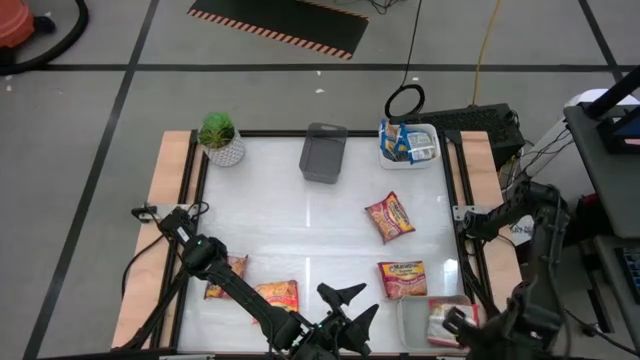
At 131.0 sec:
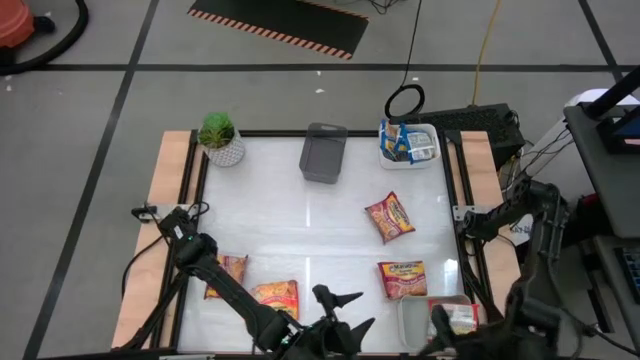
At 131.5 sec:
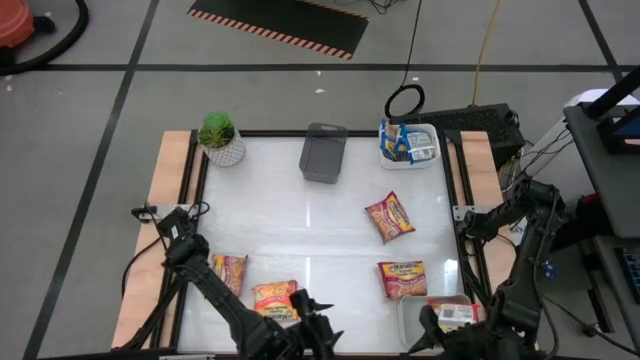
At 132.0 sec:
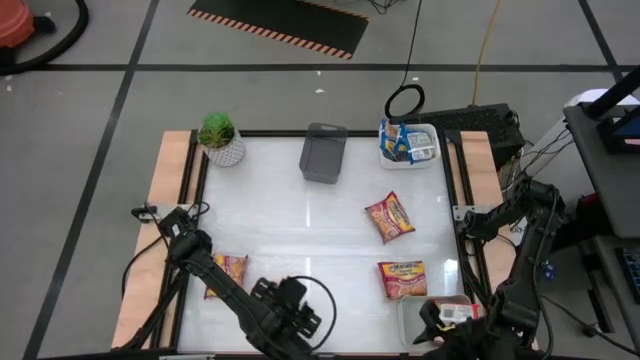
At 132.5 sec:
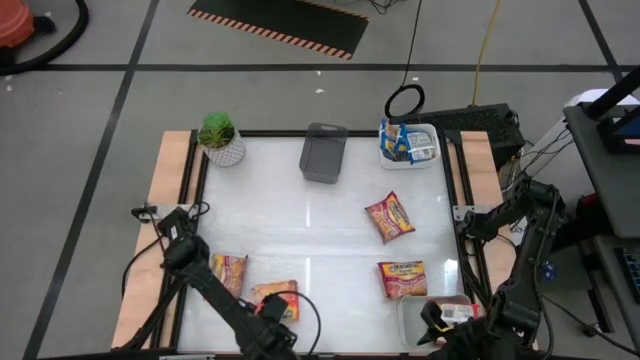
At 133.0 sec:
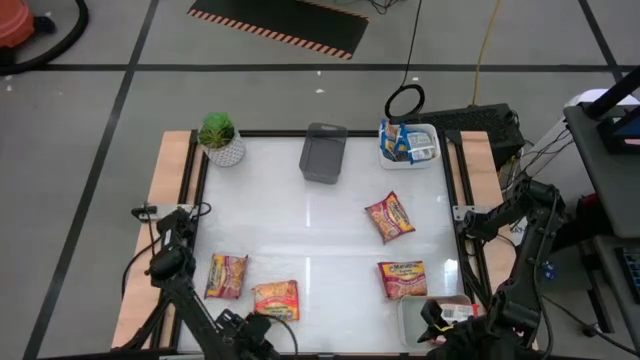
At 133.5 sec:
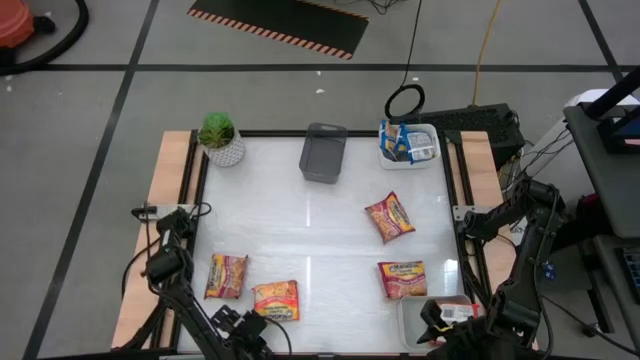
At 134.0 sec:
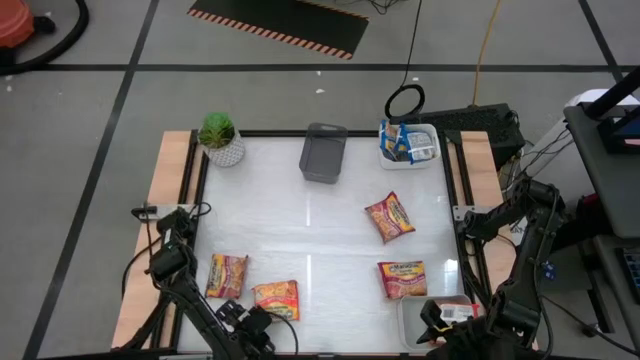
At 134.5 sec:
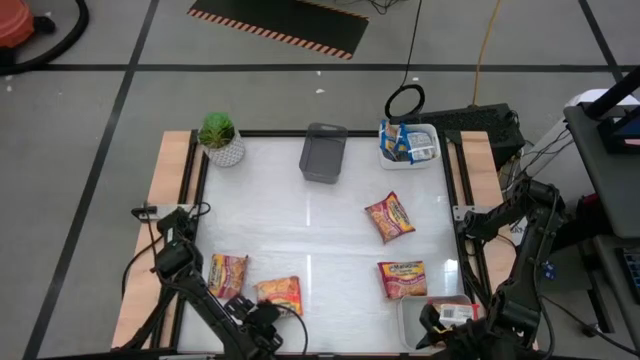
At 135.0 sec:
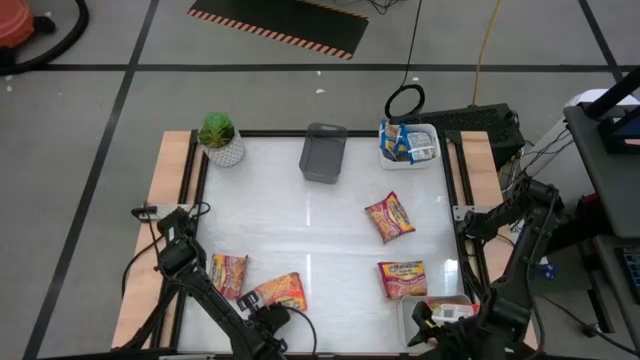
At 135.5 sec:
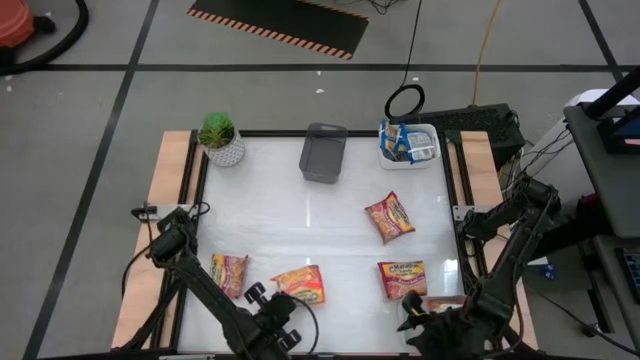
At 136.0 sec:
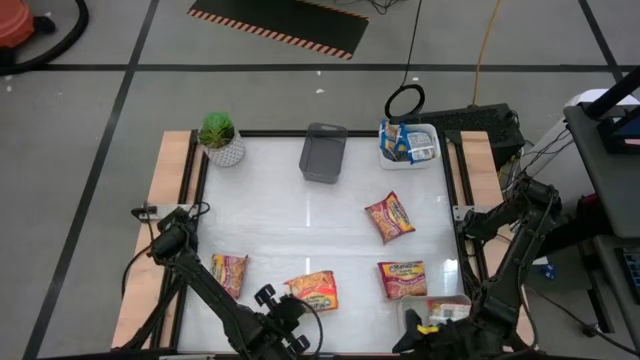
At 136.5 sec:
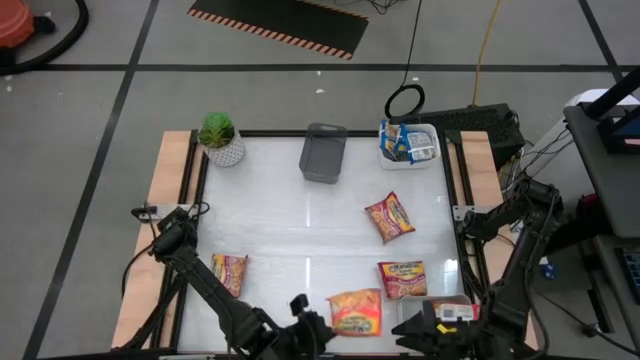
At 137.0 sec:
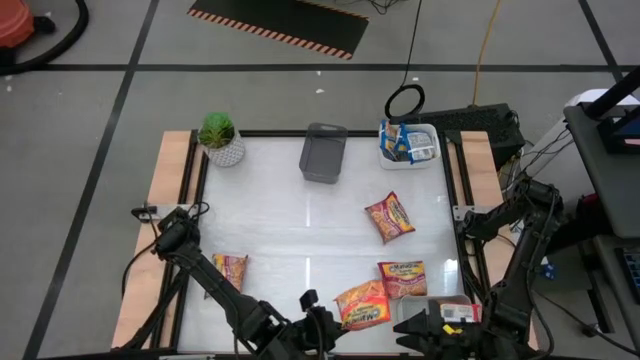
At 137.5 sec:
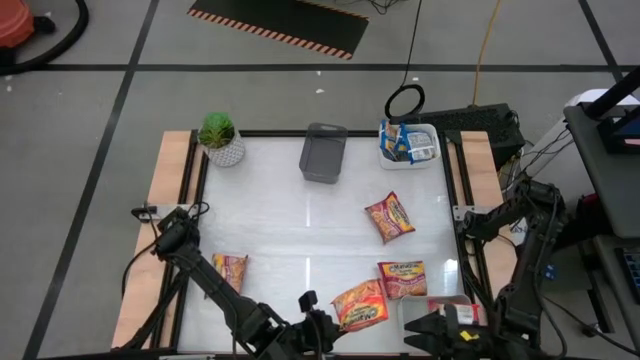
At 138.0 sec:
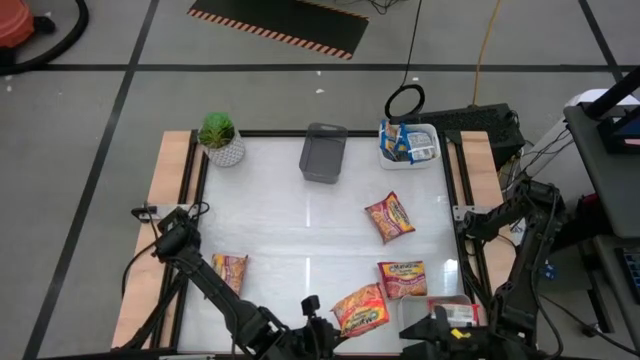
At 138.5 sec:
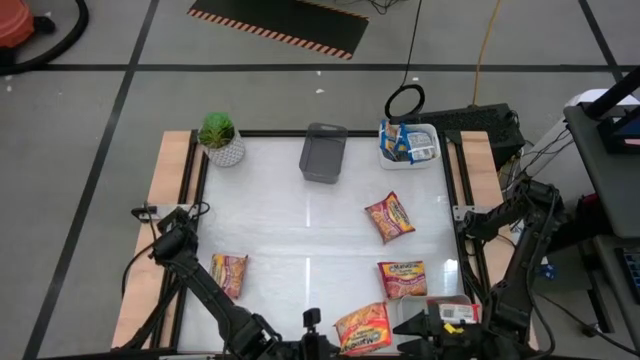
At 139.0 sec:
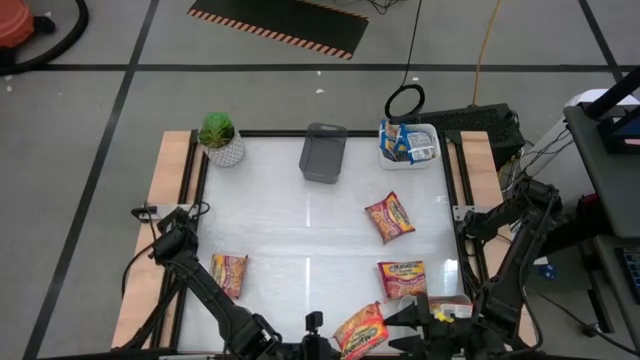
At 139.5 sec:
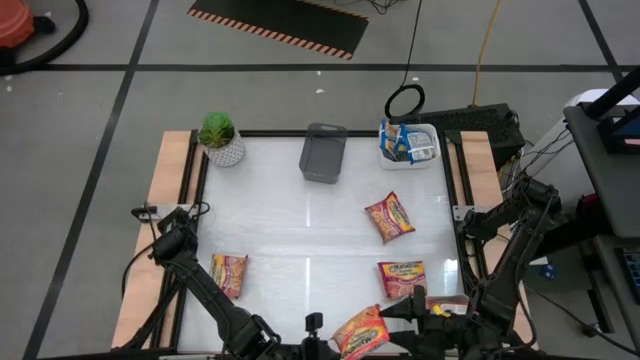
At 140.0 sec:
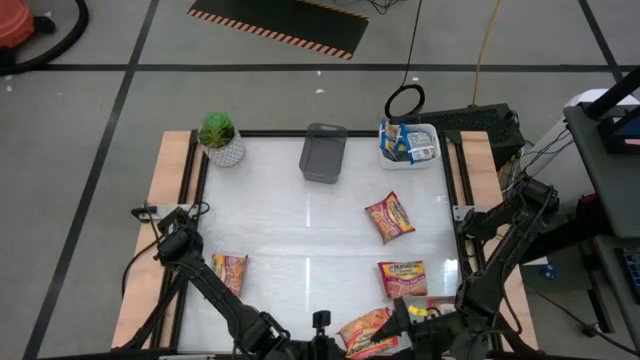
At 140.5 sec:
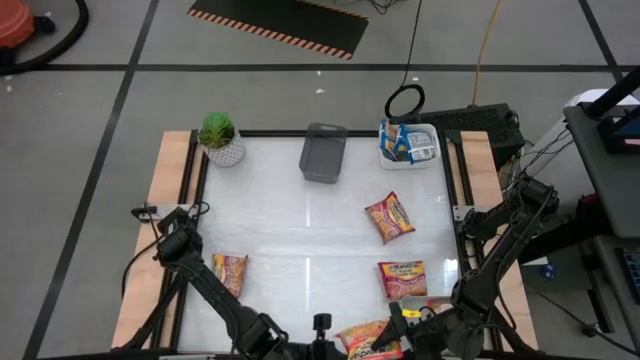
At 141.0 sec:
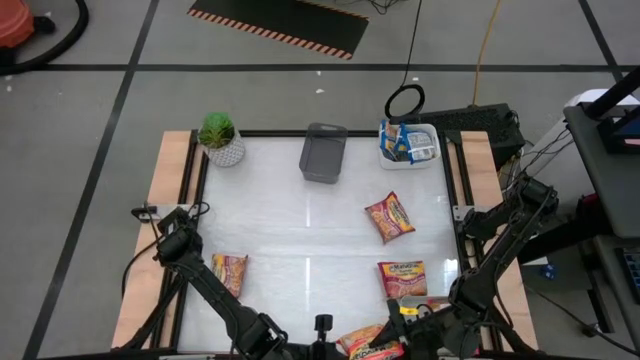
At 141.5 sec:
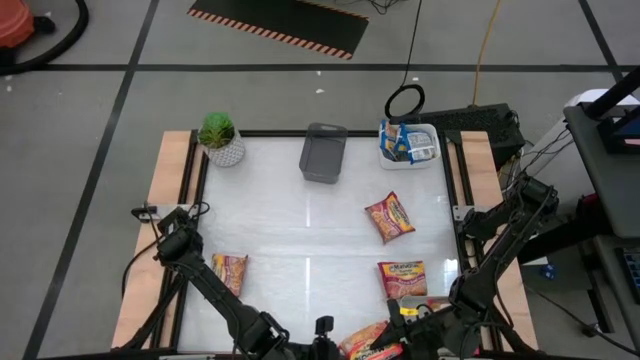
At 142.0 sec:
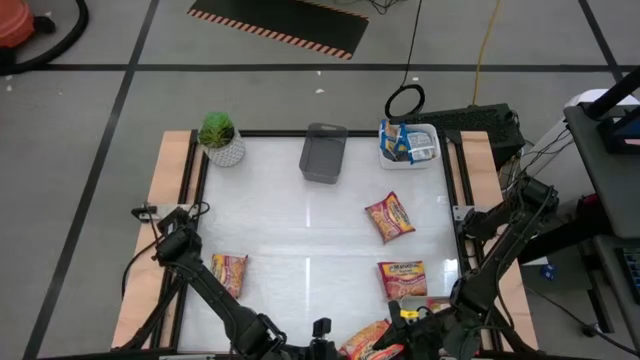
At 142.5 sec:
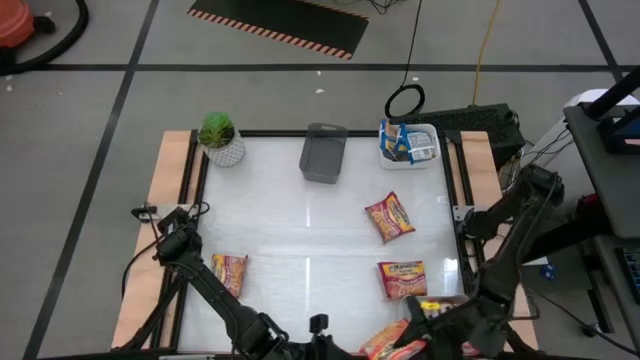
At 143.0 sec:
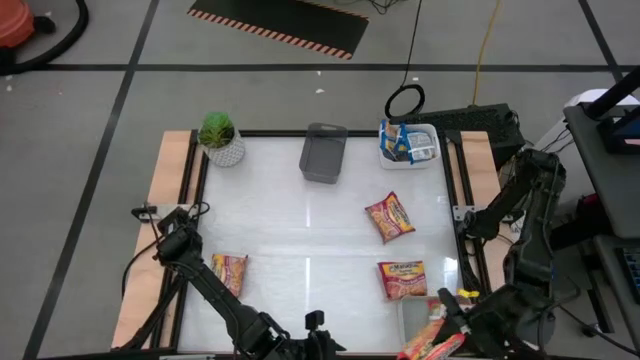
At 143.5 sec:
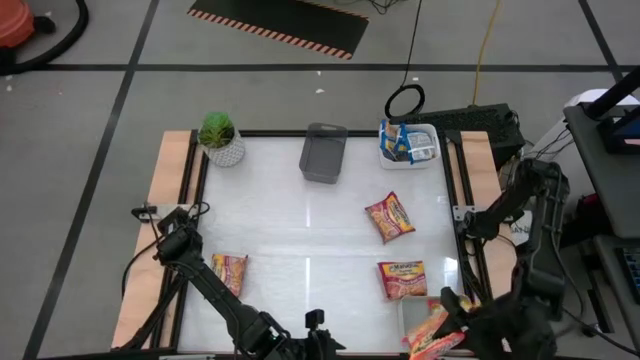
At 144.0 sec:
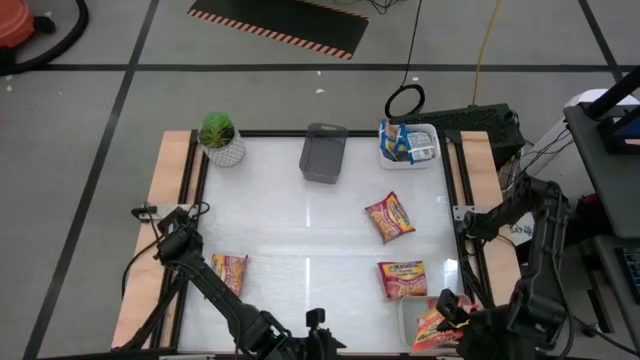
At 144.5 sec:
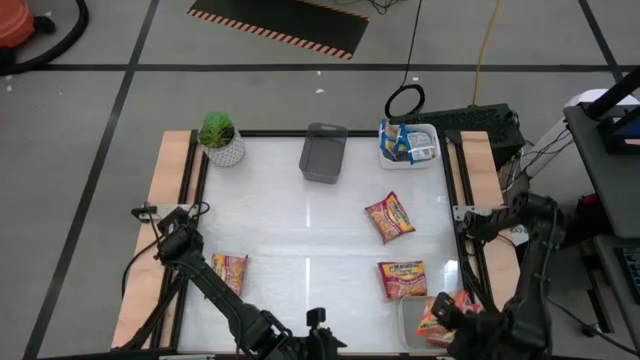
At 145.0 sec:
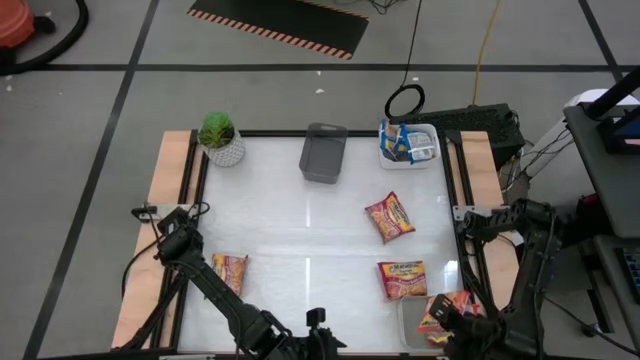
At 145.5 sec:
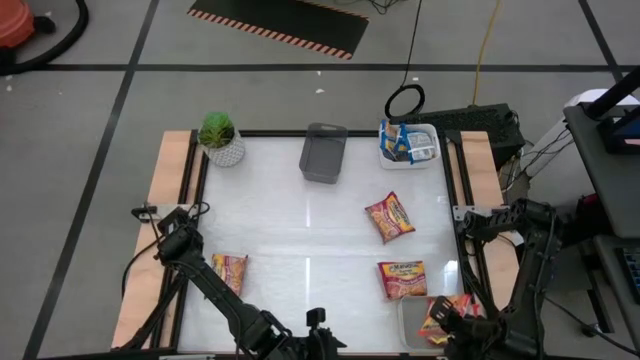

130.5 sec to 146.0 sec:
Task: Sort Maruchan noodles
Put the orange noodle pack into the gray bin

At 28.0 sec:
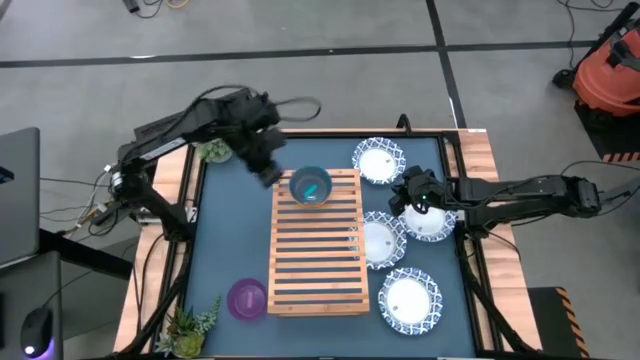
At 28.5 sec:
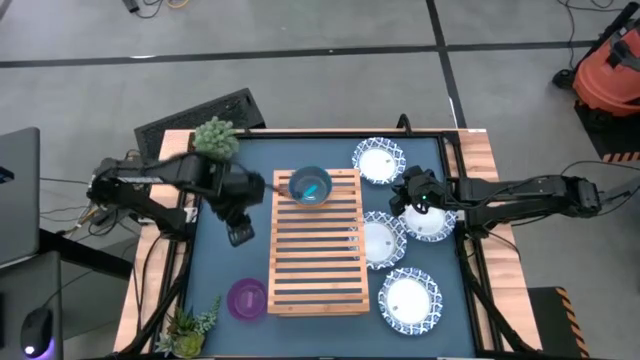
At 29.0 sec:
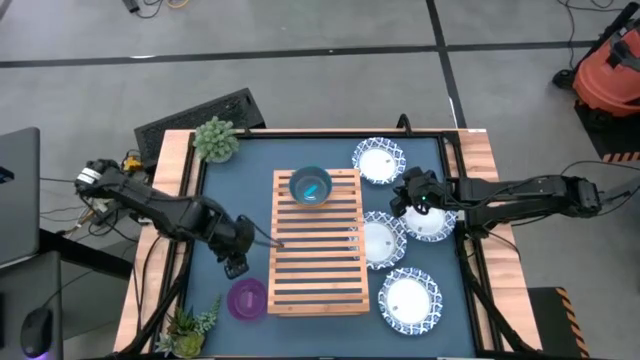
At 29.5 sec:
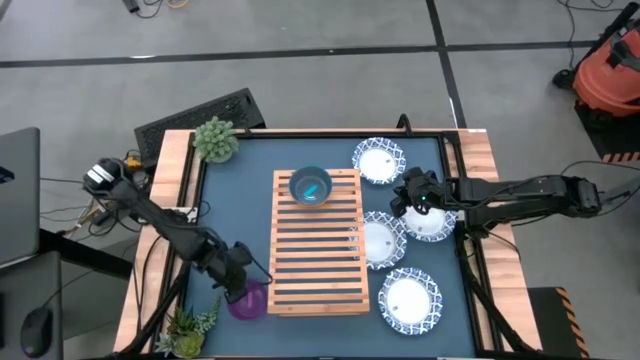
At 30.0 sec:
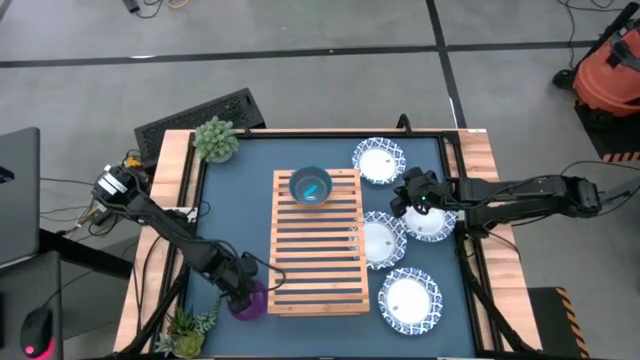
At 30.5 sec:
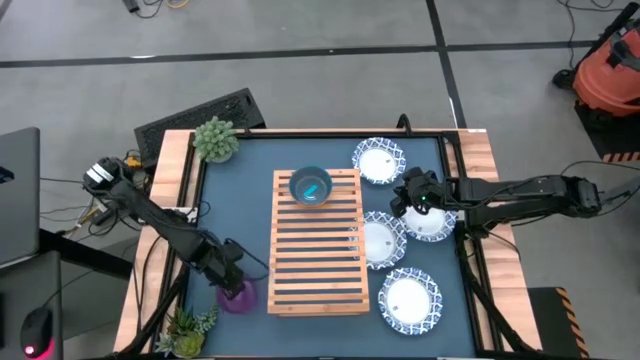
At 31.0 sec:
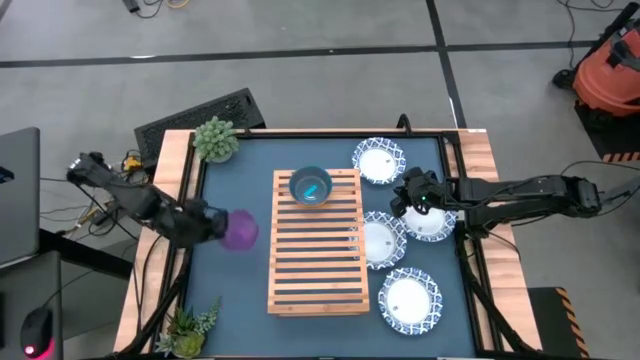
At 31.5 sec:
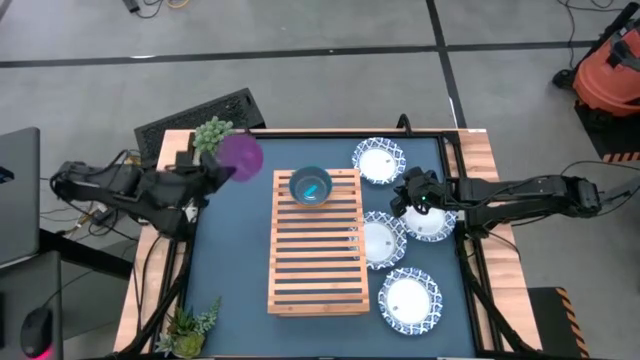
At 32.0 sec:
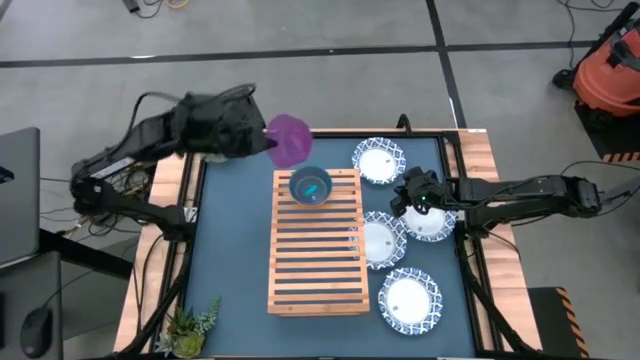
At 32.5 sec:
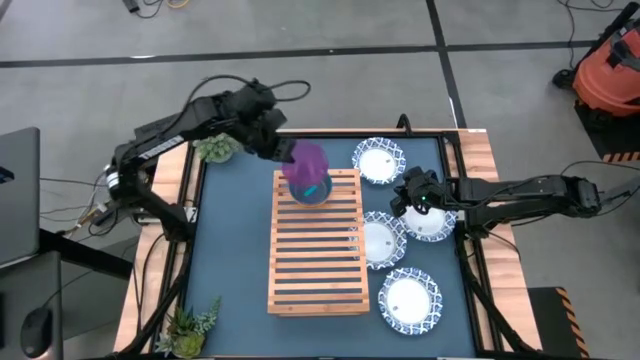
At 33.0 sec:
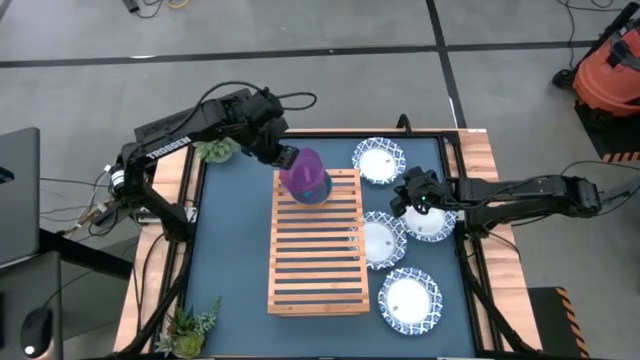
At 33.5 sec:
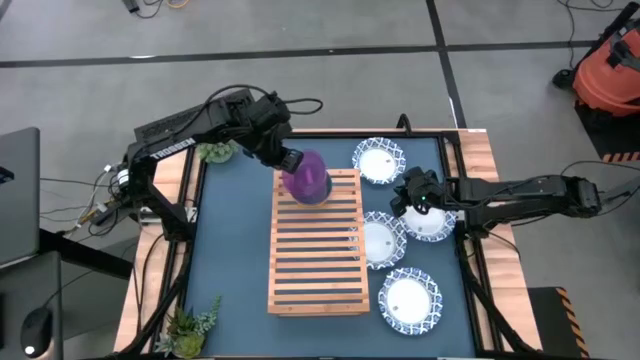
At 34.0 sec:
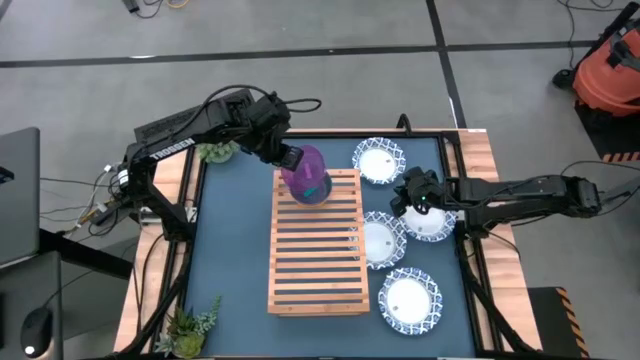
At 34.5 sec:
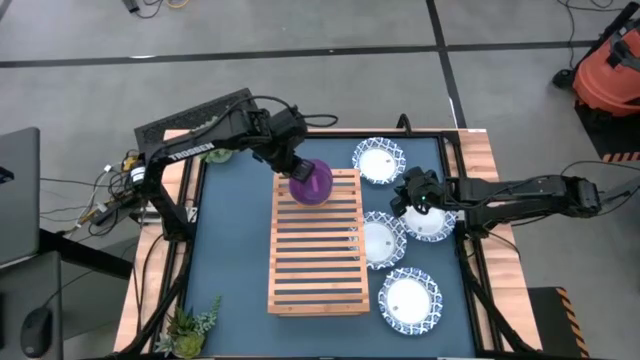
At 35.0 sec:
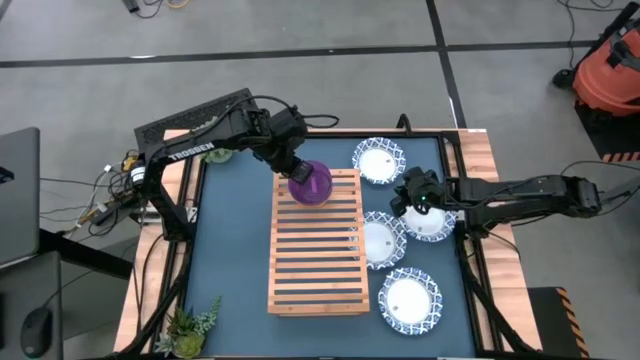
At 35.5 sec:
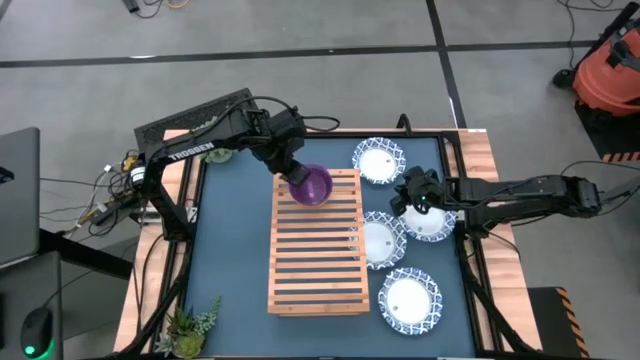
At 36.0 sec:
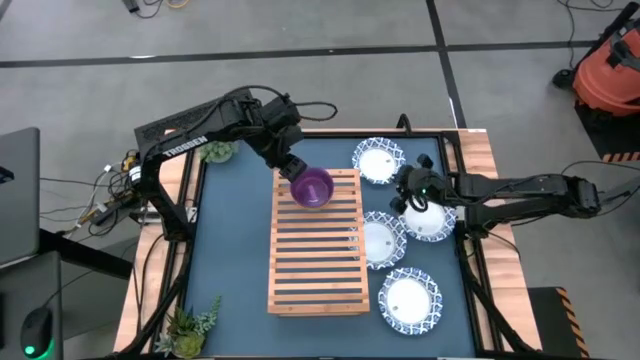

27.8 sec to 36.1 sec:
Task: Place and stack bowls onto a shelf
Stack the small violet bowl on top of the small blue bowl
